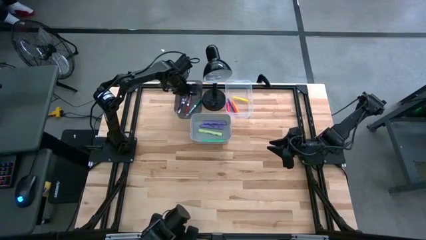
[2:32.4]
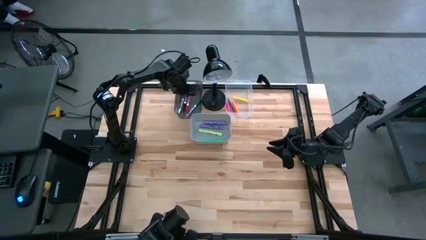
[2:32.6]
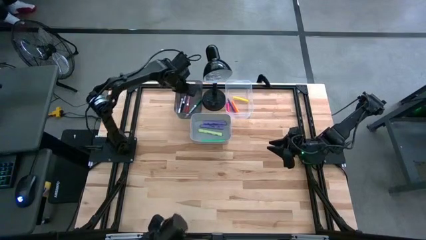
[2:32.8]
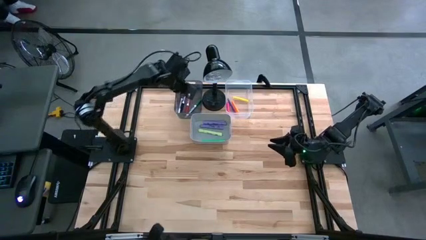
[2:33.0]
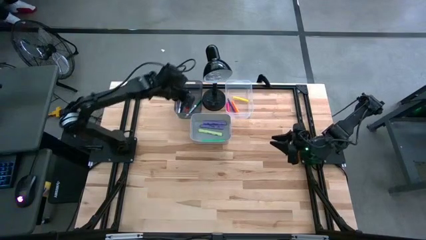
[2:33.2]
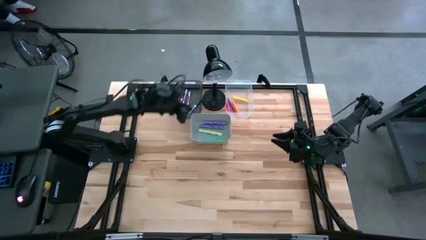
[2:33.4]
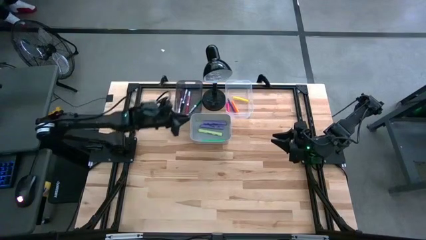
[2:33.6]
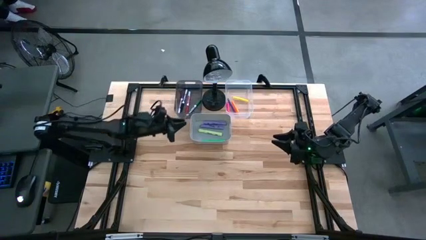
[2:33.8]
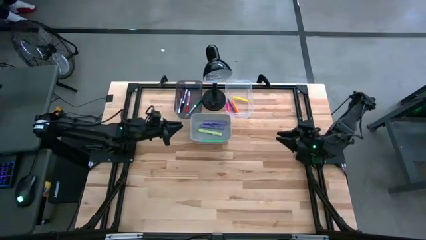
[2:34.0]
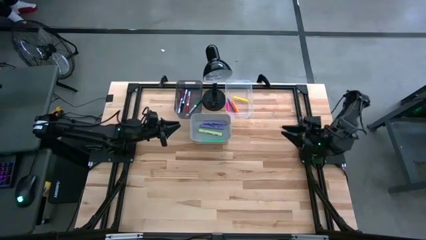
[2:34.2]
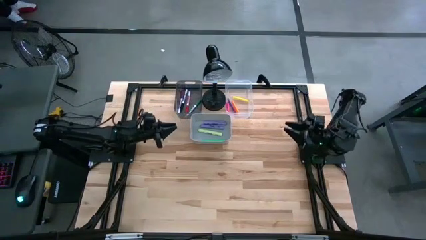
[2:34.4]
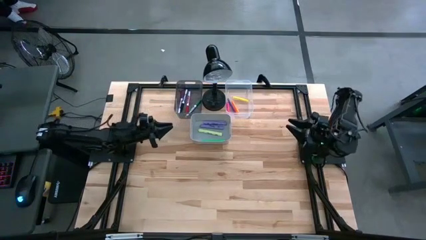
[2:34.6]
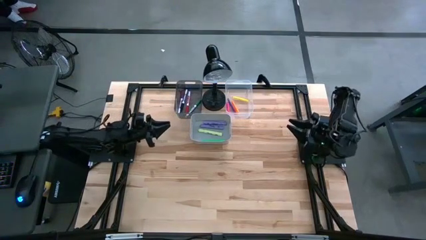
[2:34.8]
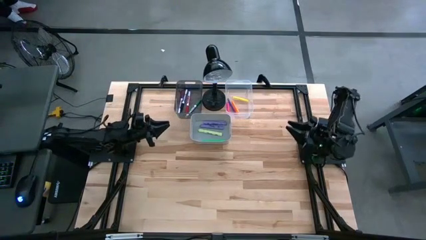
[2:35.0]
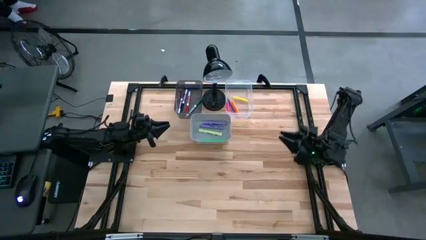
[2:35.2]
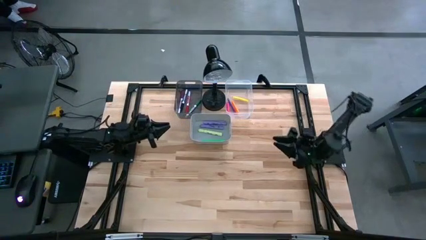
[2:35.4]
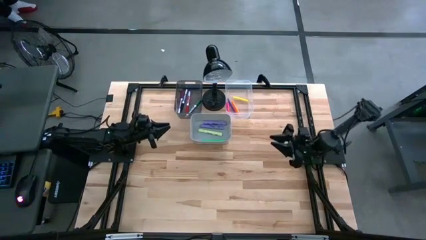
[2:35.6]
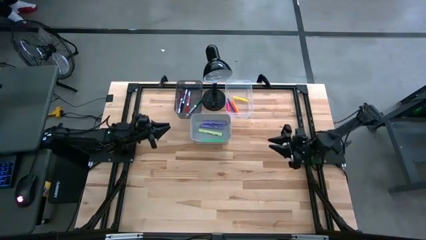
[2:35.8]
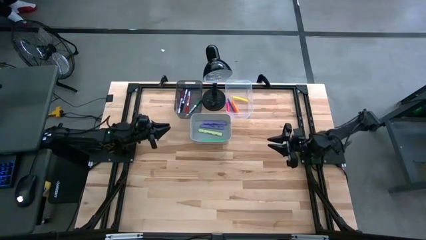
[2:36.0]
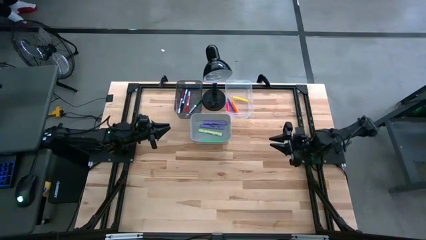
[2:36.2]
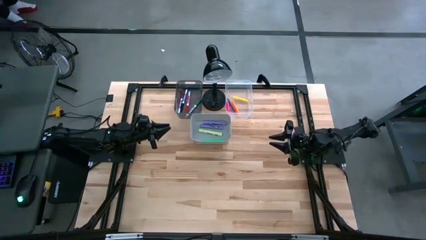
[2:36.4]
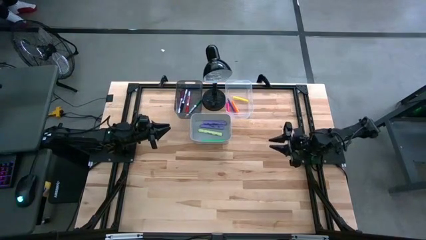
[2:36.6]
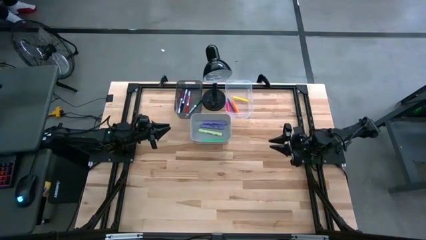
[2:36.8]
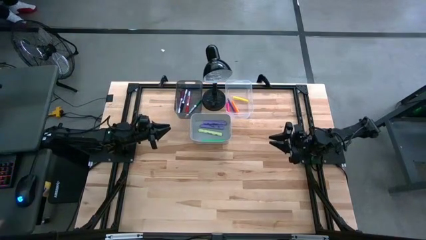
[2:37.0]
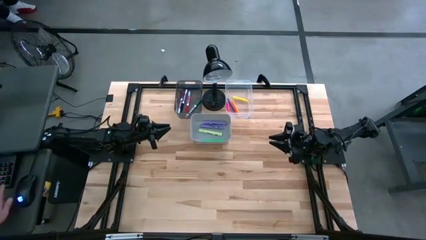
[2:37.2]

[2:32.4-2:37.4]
Task: Pick & Place Markers
Return to Home Position

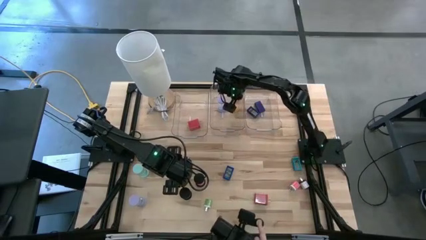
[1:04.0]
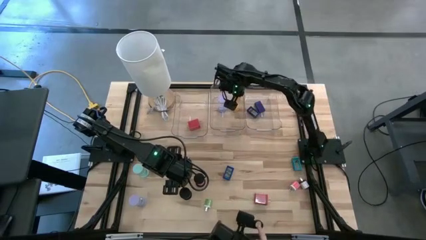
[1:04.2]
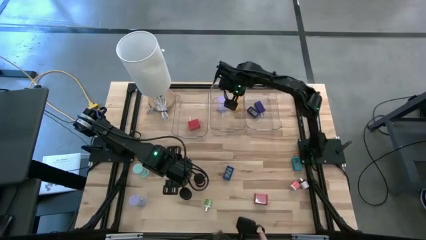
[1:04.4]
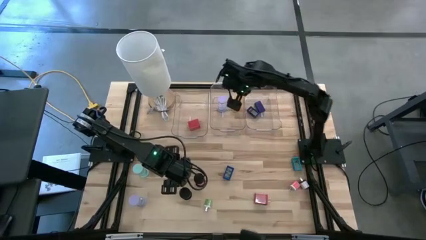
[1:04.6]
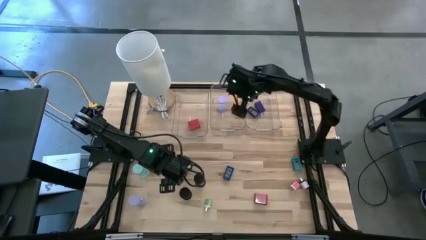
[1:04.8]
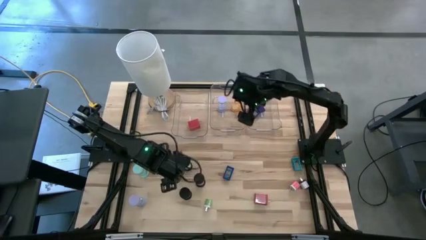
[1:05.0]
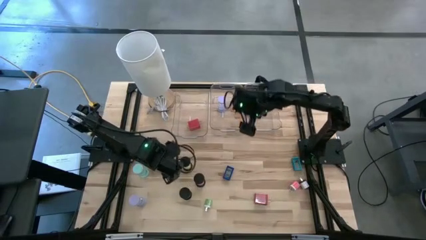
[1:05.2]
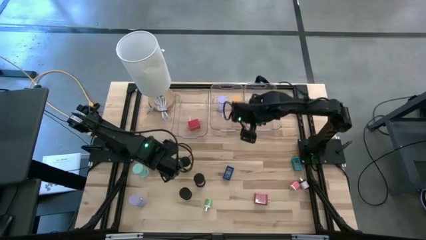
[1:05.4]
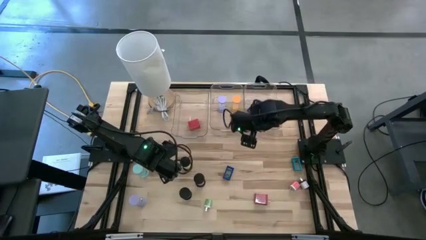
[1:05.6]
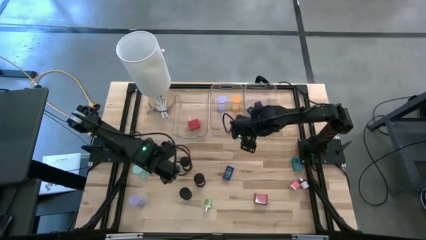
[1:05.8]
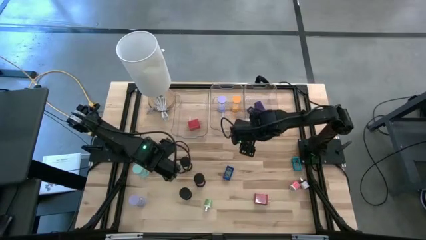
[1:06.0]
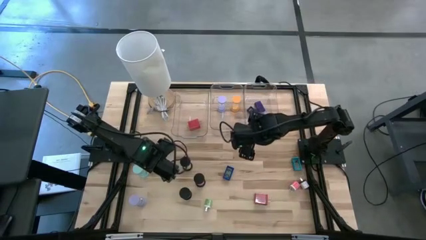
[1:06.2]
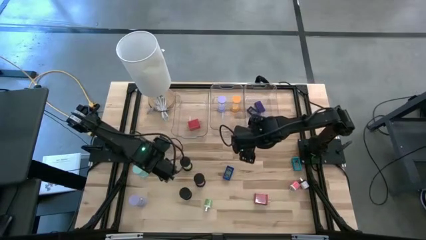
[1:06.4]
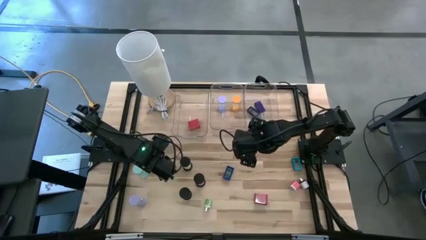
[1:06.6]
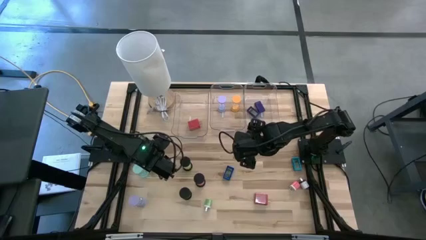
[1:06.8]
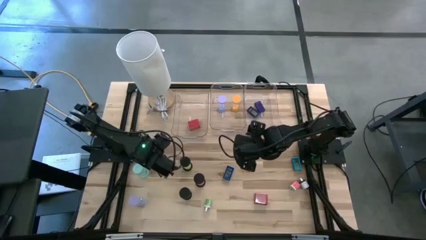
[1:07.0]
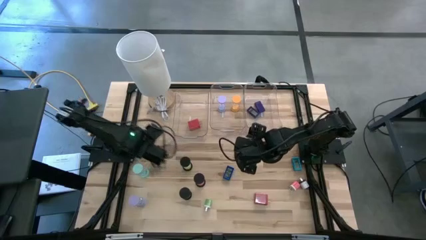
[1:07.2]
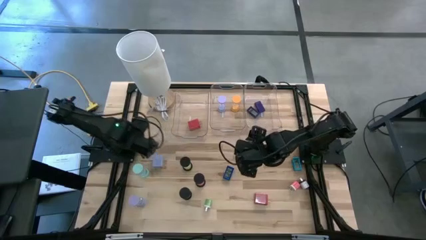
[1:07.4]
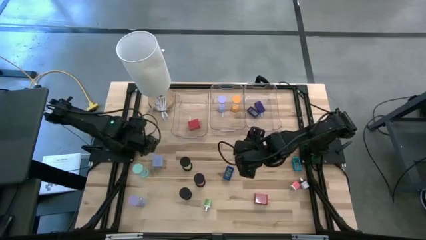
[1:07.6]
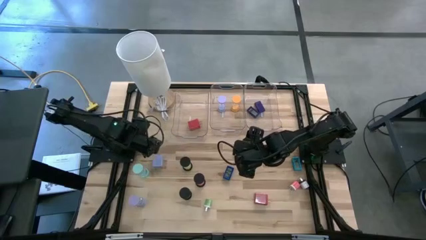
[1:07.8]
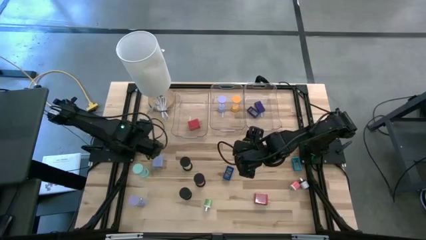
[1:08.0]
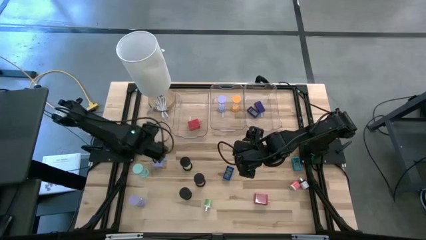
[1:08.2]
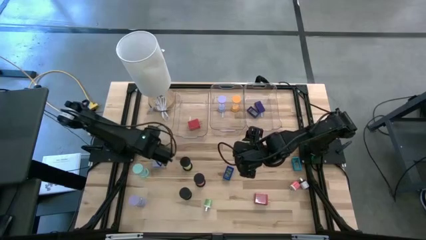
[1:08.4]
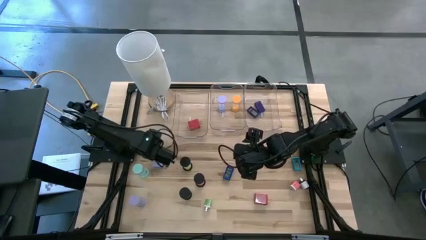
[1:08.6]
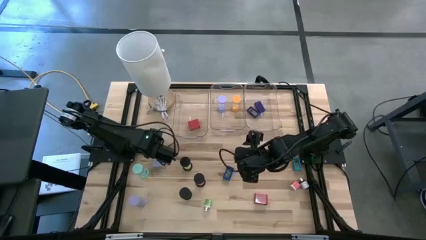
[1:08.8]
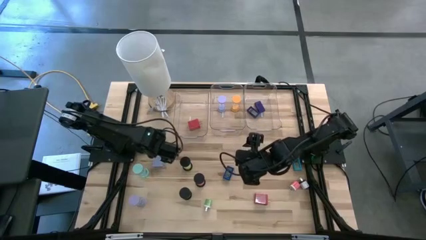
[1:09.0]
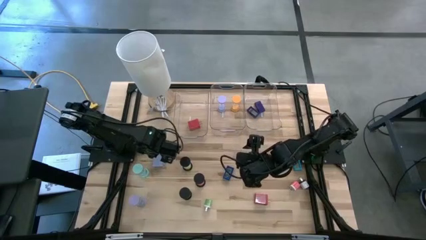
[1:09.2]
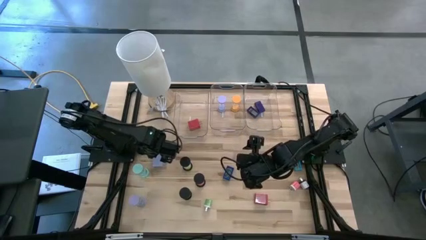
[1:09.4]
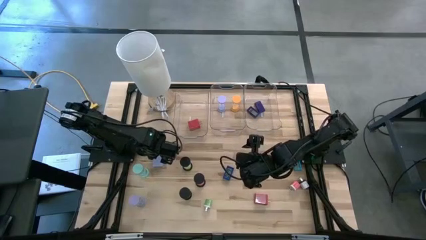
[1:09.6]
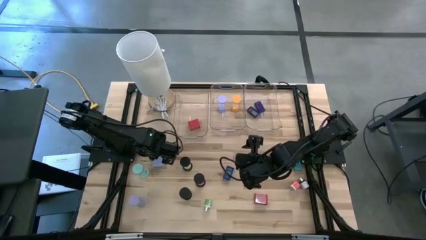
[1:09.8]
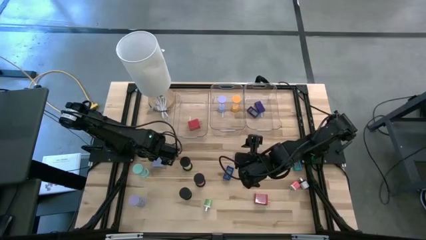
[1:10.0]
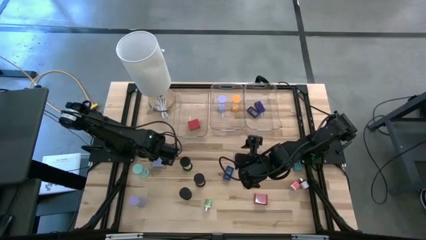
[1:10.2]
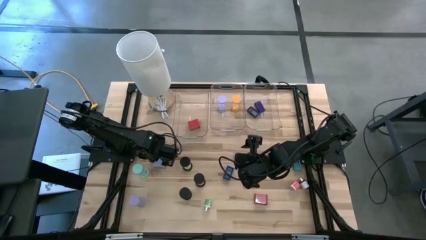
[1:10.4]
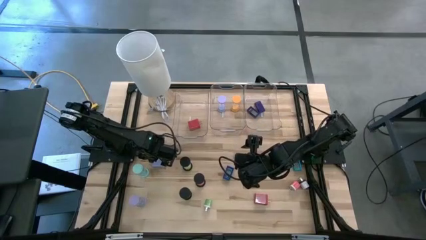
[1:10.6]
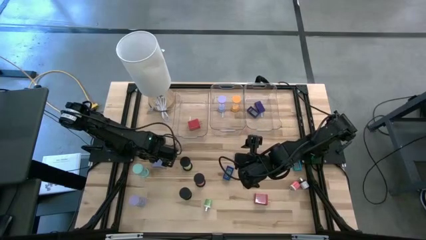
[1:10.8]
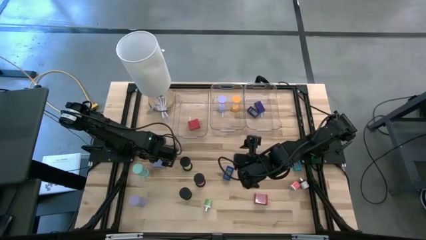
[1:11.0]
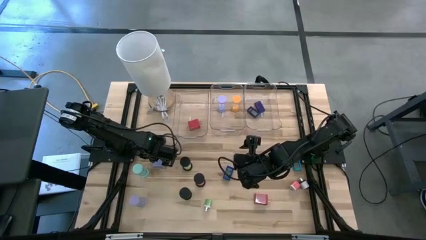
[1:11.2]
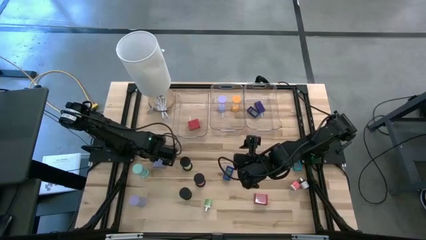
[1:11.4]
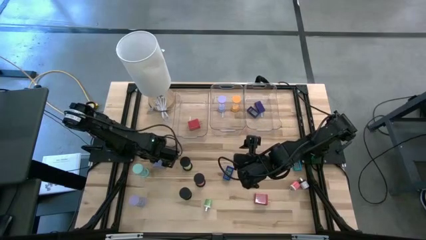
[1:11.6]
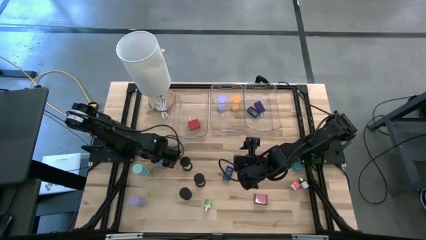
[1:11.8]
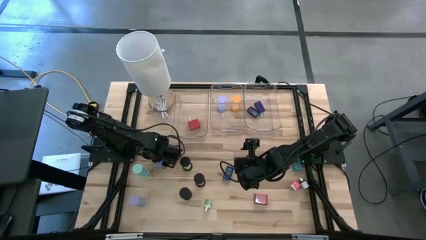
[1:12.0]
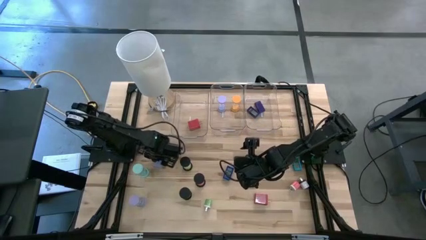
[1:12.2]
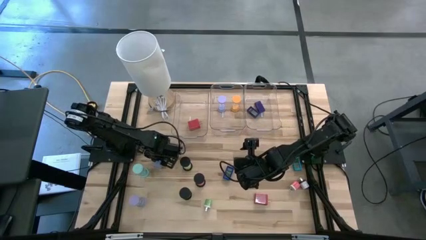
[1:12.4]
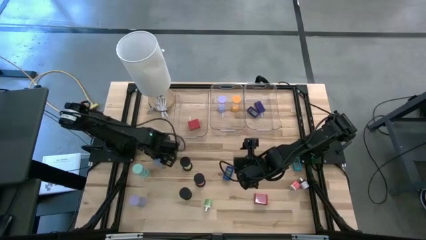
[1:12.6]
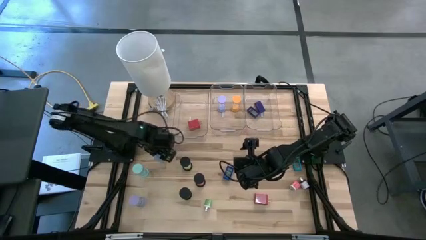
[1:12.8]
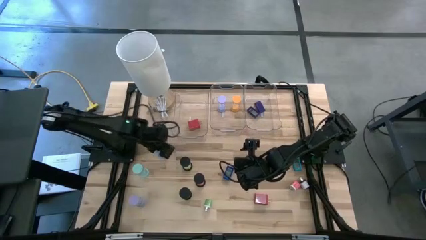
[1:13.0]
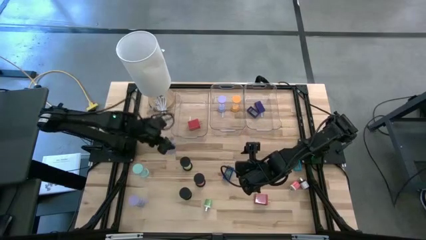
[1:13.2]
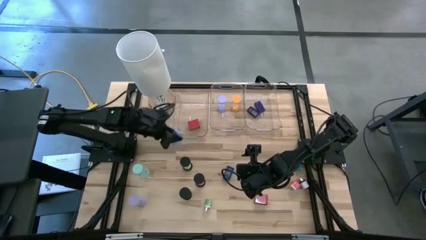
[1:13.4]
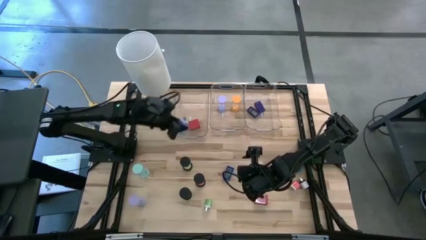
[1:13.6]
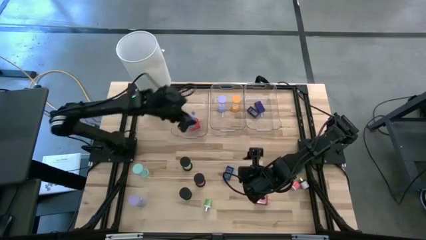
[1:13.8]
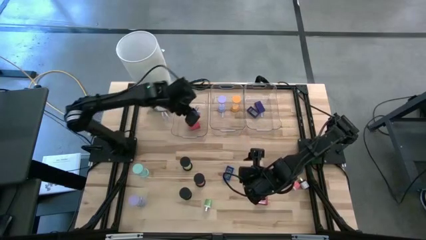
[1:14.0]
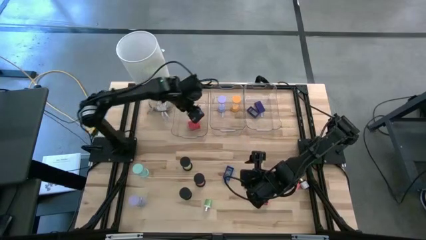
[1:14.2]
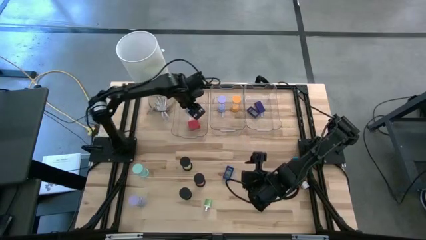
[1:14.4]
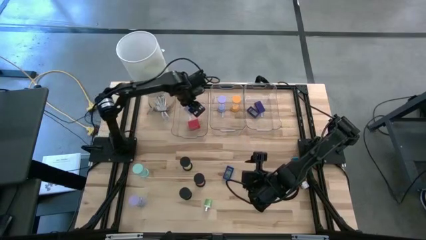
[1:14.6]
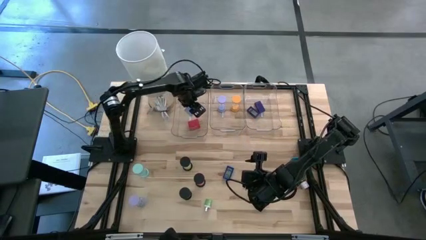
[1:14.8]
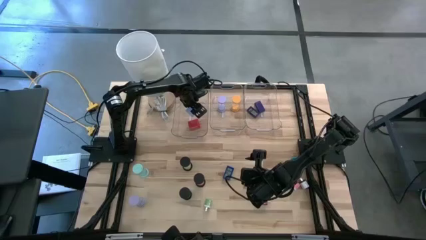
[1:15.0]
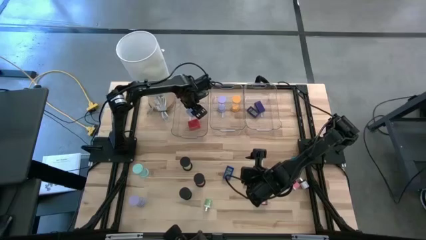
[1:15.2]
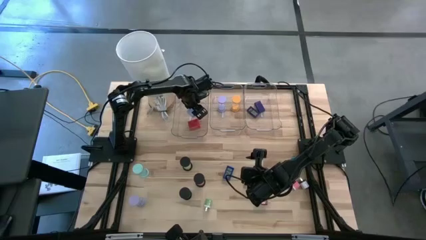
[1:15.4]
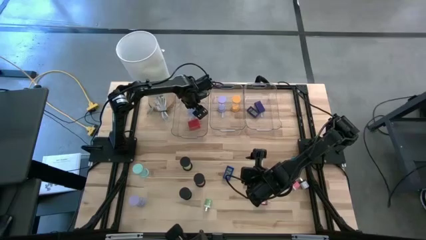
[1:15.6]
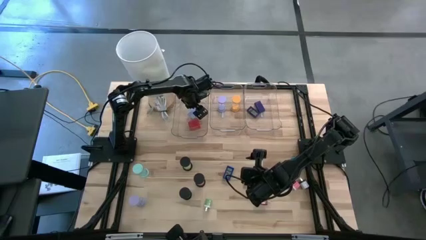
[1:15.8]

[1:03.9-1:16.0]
Task: Pick & Place Office items
Put the blue charger adapter into the left transparent bin
